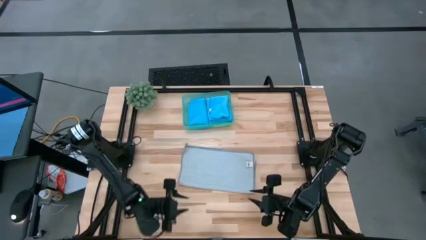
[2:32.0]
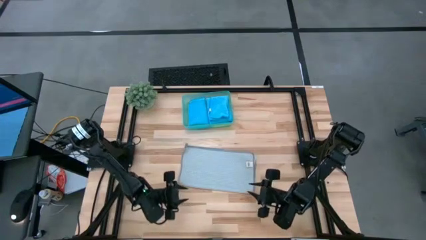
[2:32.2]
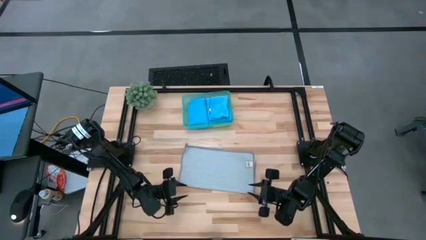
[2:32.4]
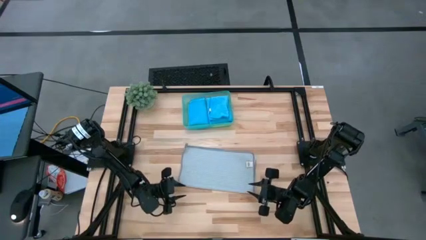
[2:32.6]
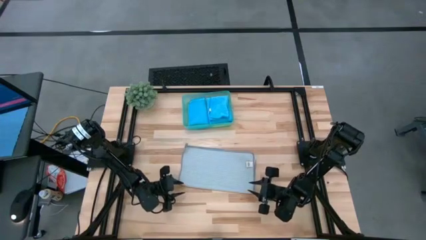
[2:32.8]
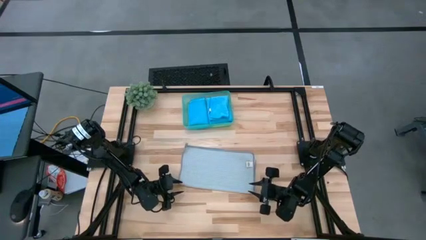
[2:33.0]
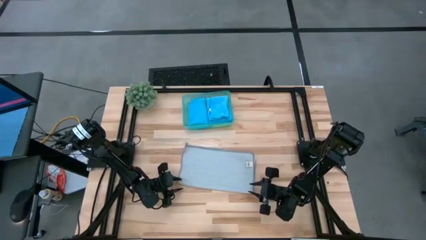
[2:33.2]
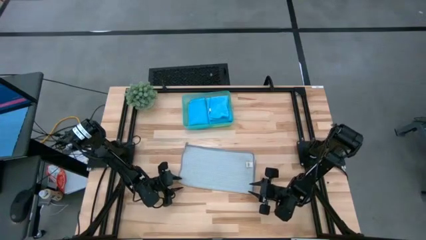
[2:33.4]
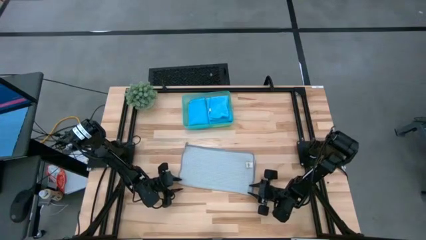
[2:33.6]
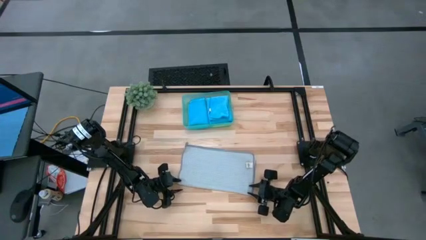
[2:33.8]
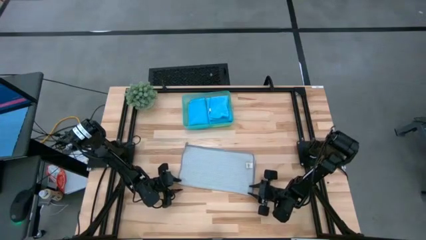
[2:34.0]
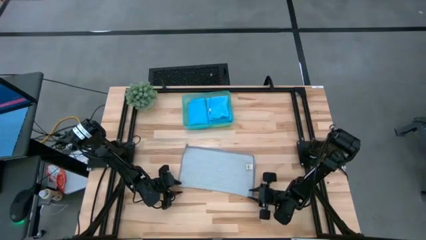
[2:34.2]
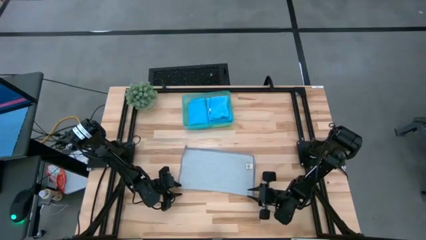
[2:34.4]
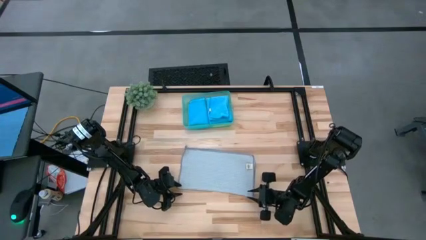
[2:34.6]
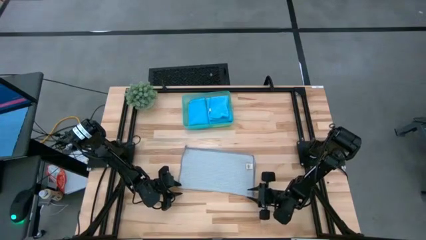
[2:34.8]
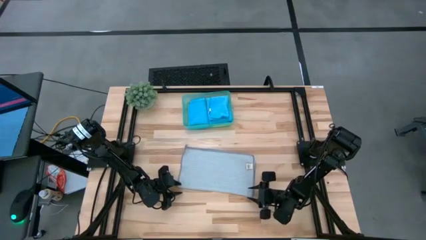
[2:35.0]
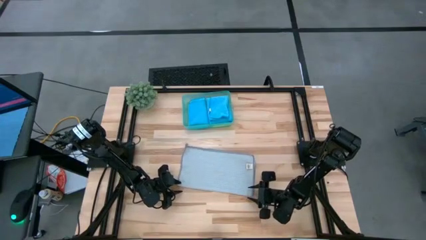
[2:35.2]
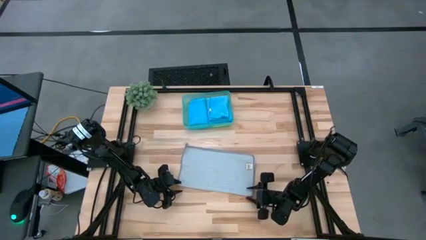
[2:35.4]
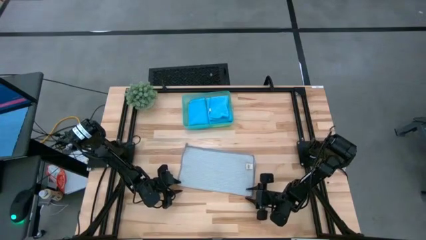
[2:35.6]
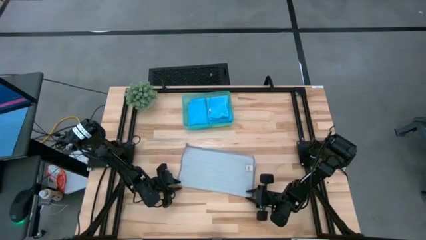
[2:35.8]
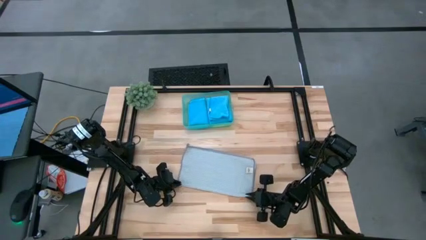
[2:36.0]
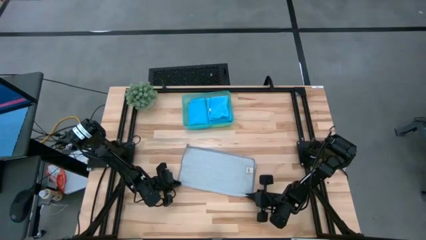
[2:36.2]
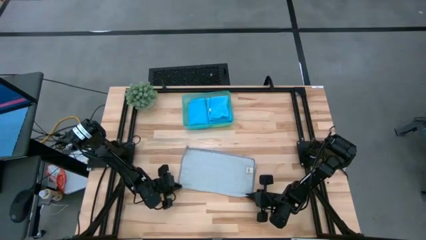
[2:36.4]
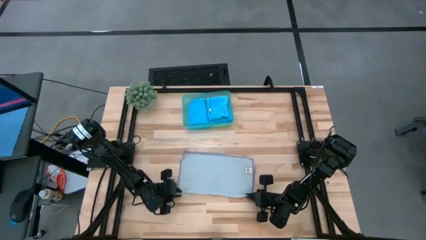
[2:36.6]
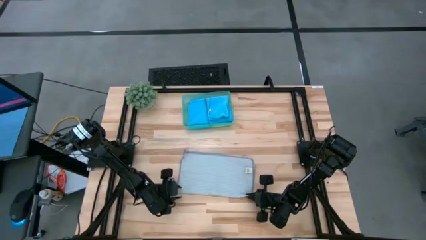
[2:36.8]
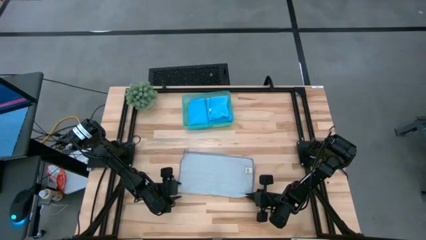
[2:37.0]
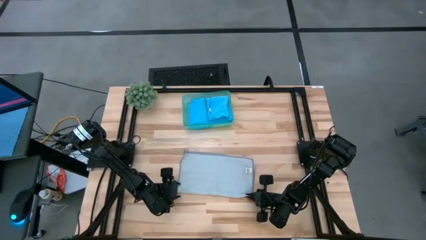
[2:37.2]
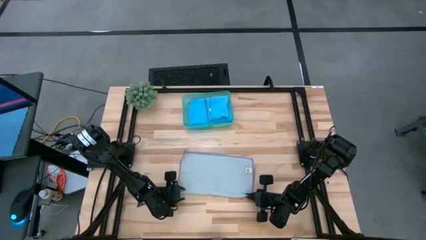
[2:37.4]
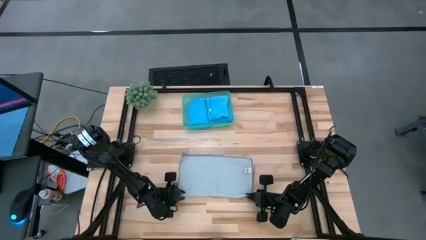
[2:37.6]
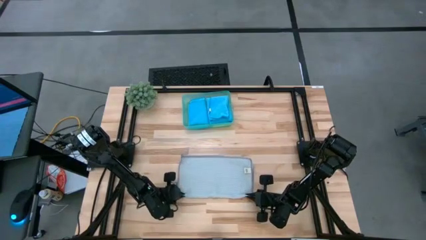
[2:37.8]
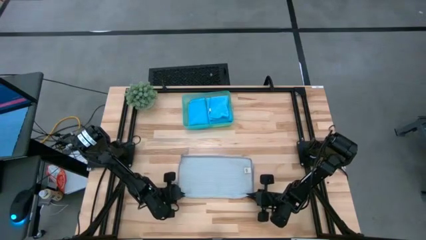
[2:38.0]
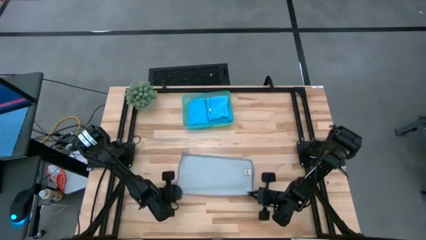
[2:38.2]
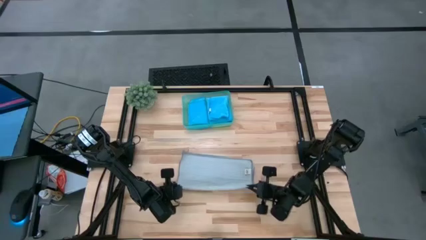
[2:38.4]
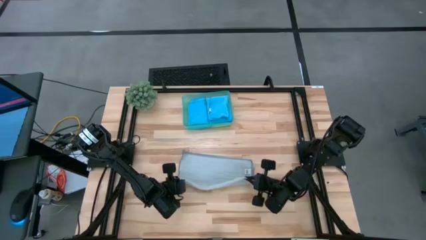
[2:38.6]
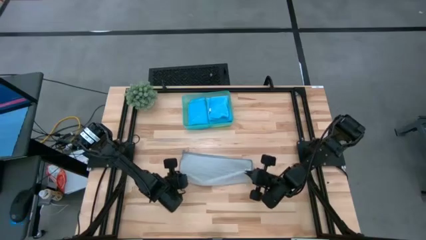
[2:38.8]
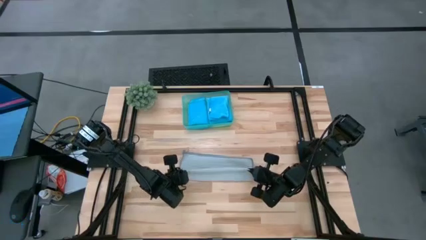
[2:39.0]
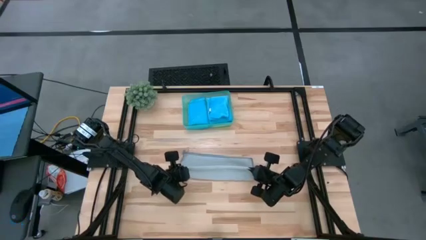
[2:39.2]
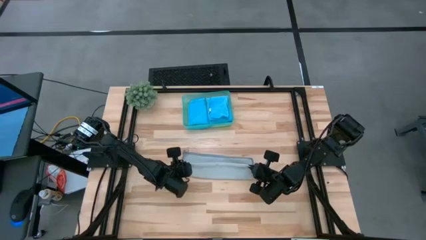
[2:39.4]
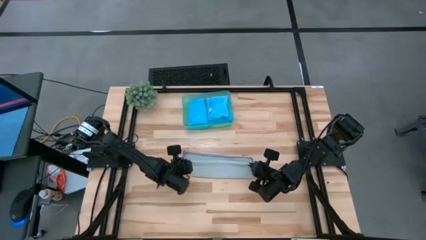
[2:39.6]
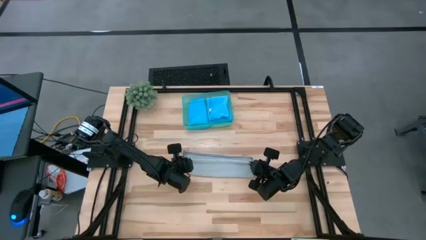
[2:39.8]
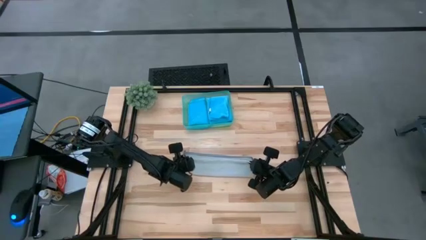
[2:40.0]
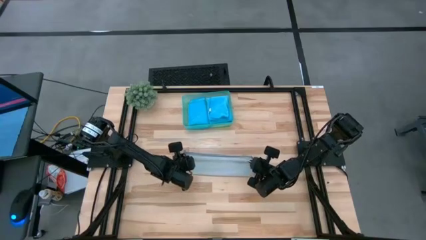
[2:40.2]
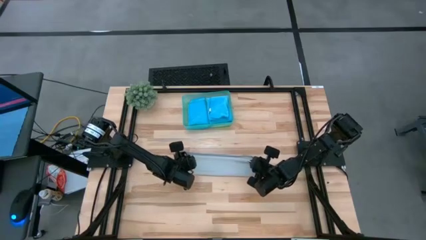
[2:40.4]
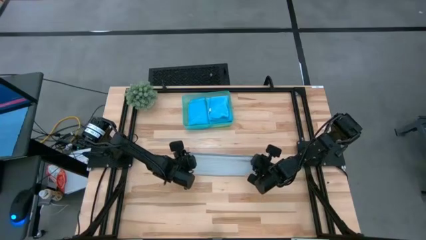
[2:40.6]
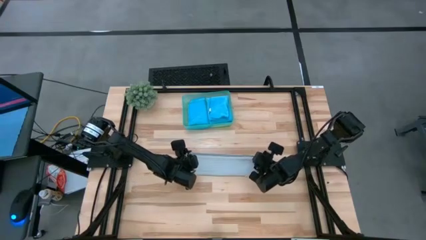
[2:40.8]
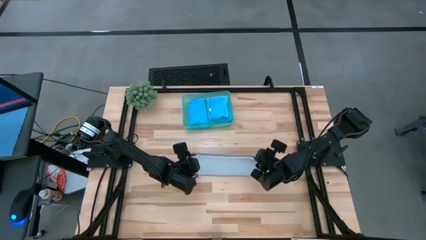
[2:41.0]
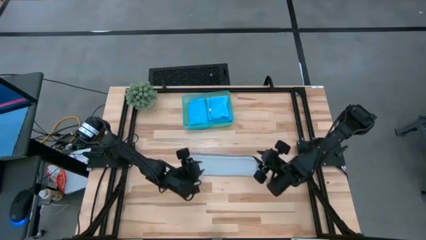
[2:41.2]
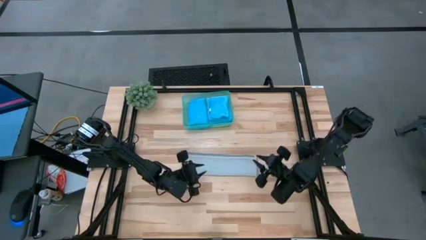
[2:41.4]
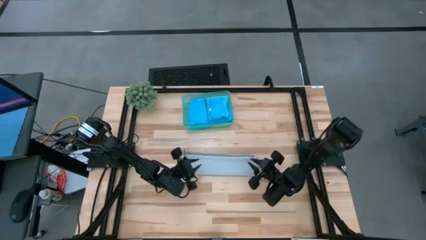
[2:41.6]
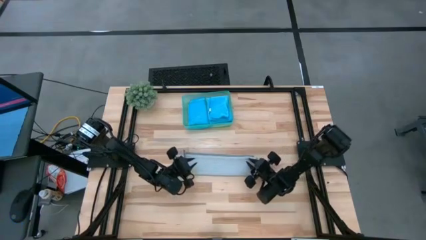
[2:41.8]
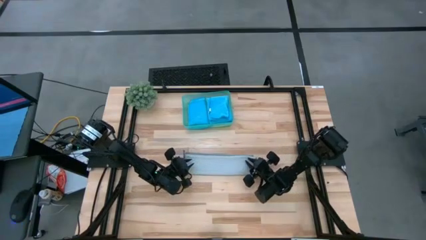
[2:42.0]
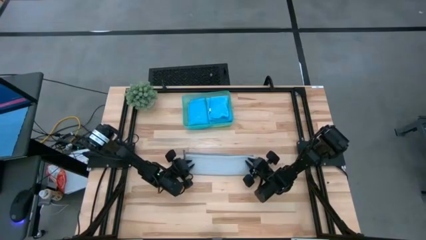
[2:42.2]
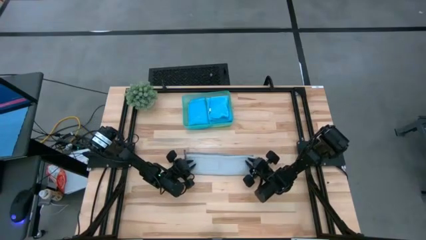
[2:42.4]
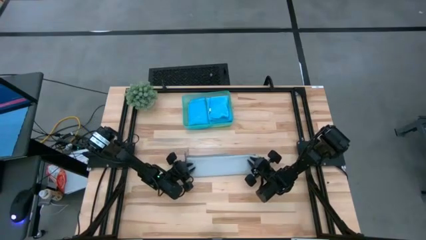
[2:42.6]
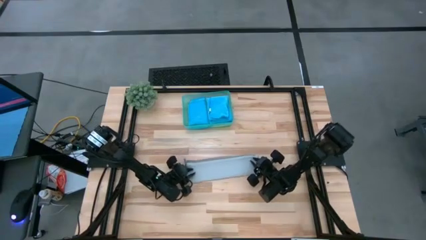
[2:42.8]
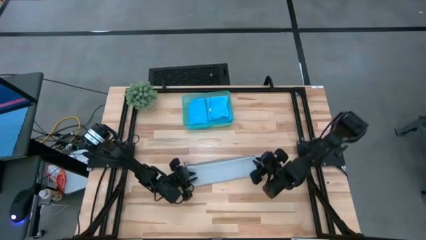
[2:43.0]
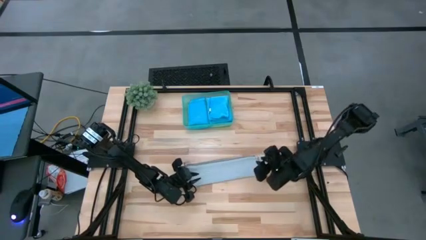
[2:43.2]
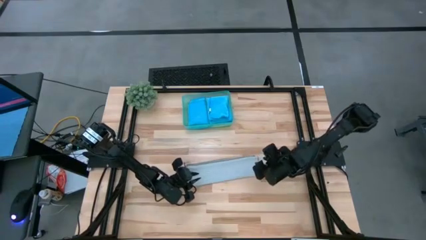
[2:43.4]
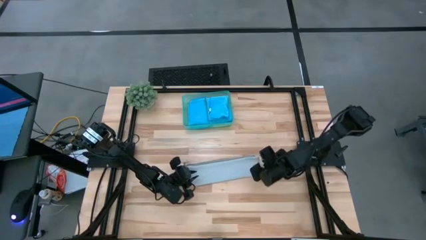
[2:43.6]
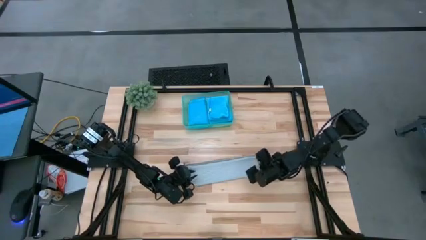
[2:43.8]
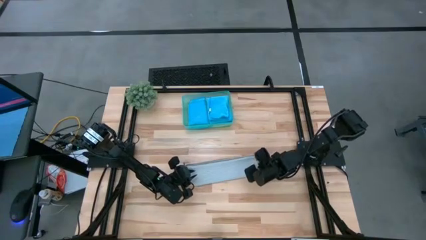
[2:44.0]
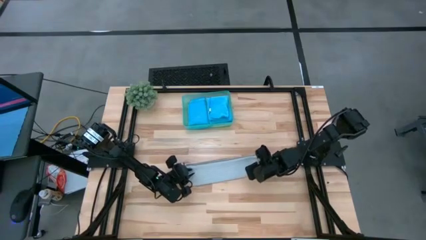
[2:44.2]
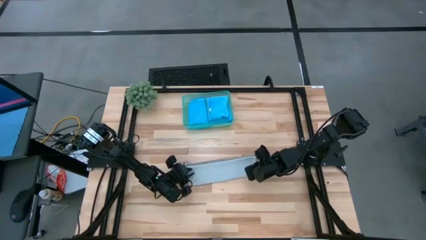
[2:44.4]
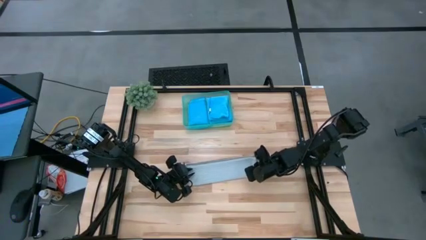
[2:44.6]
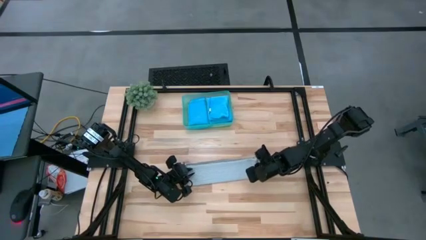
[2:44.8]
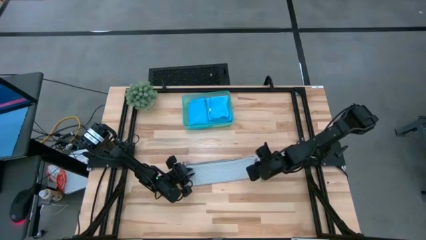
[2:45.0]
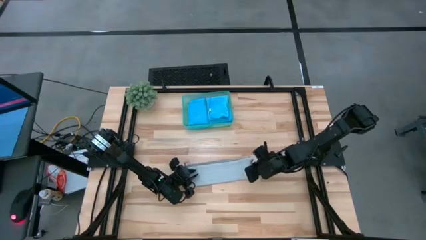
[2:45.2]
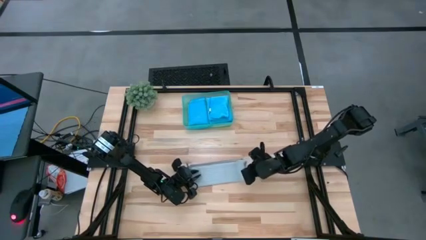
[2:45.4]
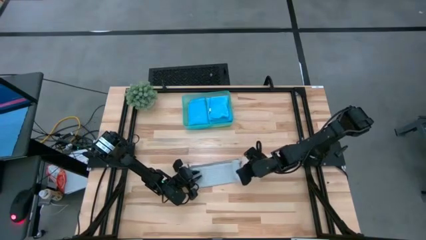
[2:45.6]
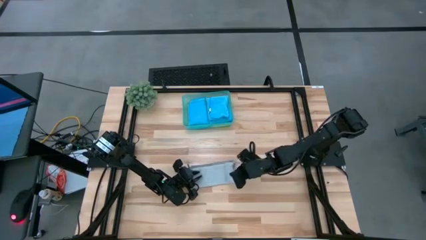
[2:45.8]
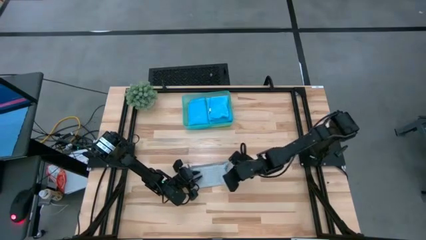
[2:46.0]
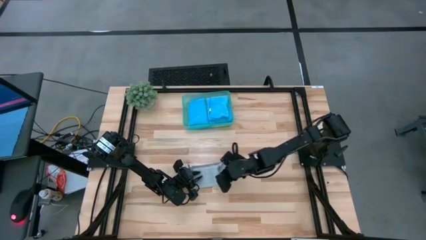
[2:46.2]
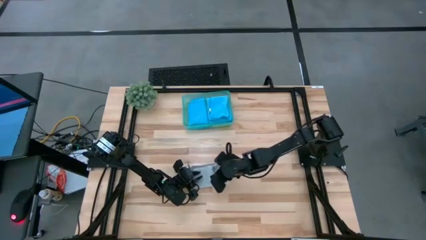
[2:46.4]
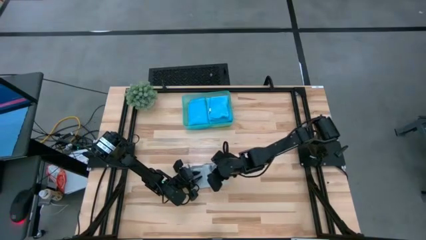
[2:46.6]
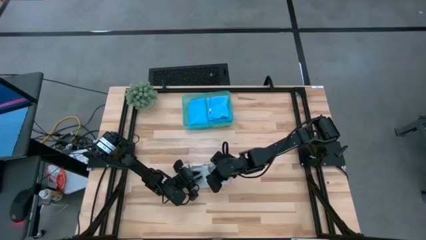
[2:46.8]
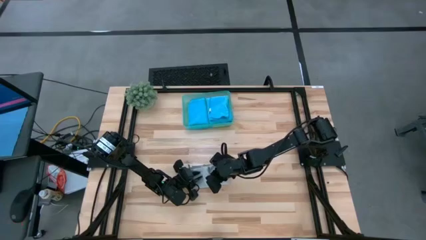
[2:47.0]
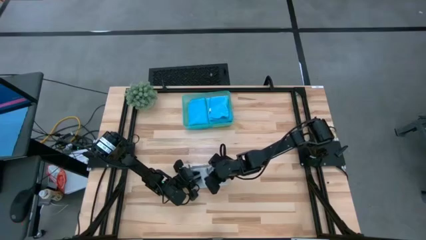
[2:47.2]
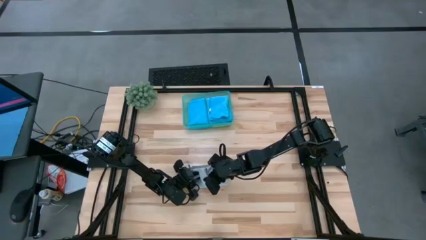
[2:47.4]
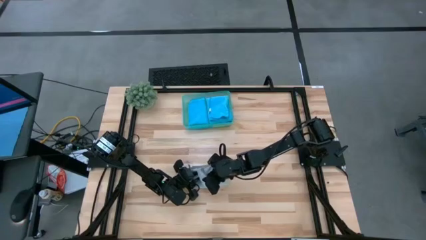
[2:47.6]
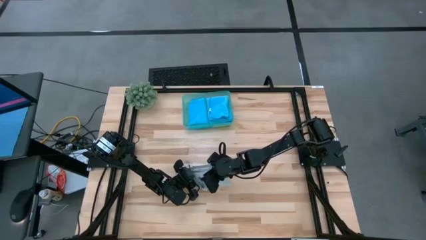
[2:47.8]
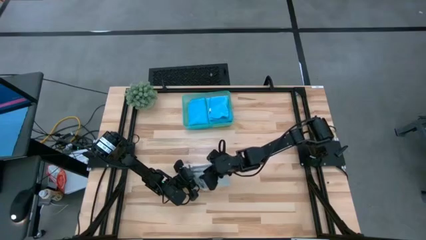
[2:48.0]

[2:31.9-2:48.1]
Task: Fold microfiber towels
Fold the gray microfiber towel
